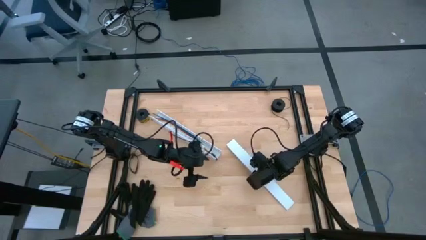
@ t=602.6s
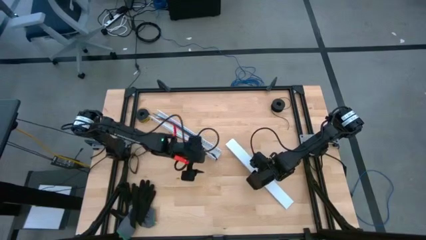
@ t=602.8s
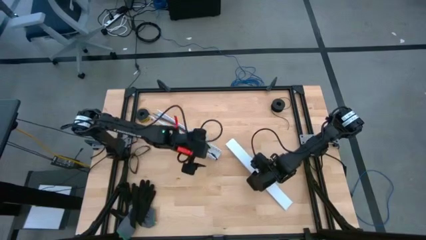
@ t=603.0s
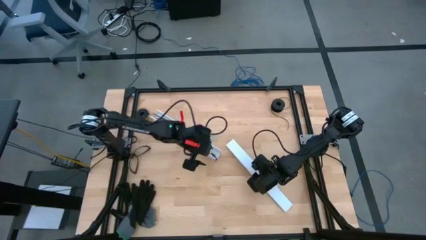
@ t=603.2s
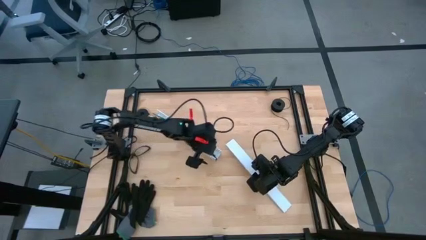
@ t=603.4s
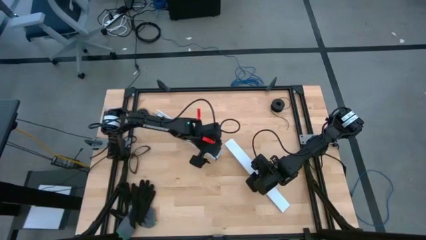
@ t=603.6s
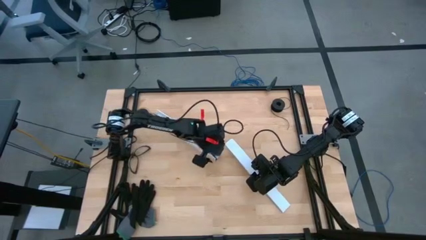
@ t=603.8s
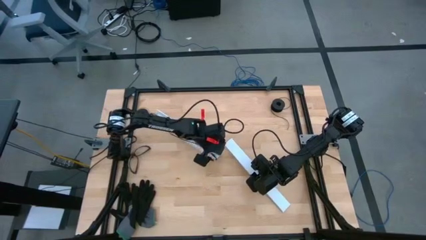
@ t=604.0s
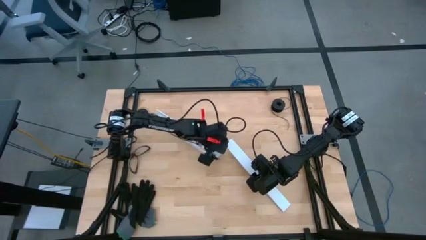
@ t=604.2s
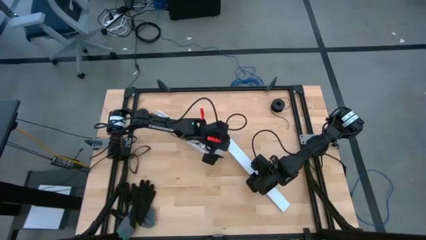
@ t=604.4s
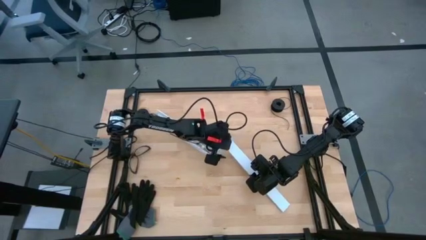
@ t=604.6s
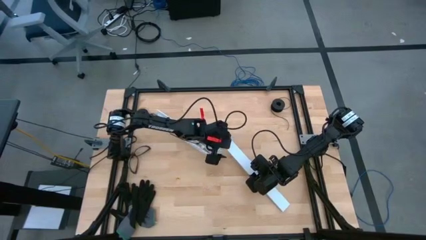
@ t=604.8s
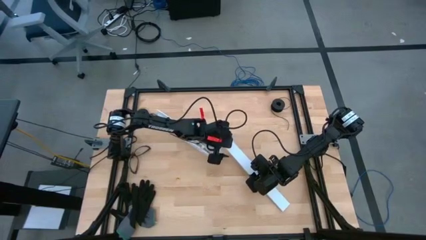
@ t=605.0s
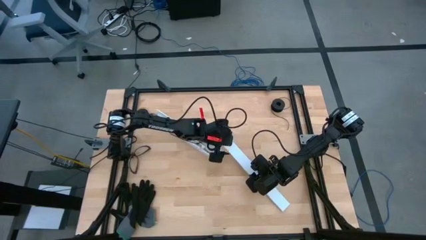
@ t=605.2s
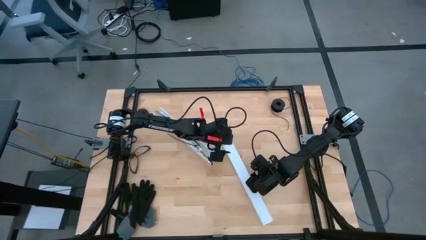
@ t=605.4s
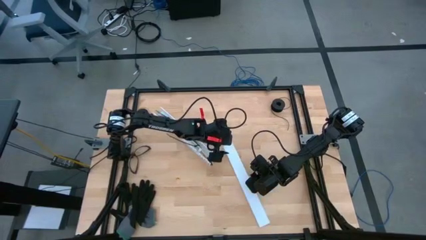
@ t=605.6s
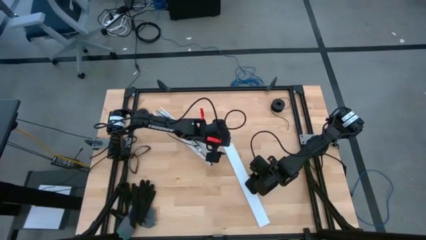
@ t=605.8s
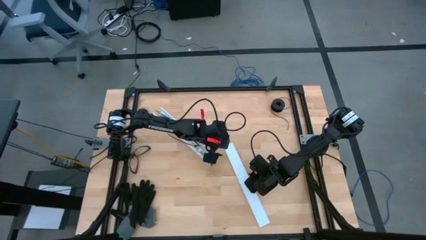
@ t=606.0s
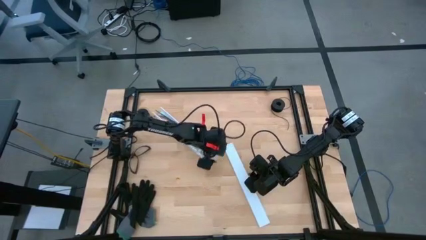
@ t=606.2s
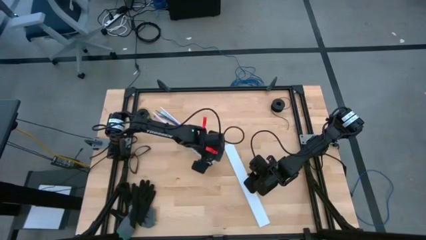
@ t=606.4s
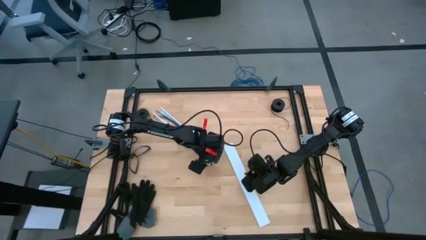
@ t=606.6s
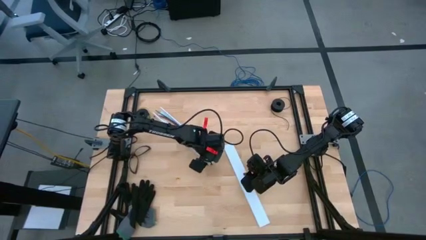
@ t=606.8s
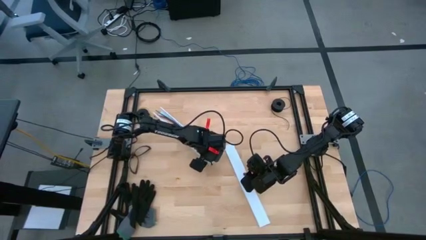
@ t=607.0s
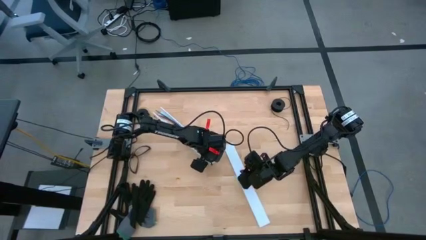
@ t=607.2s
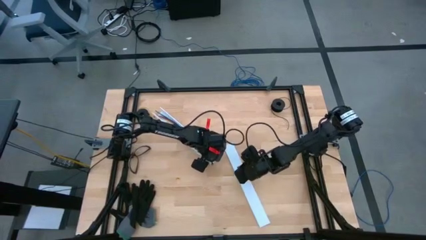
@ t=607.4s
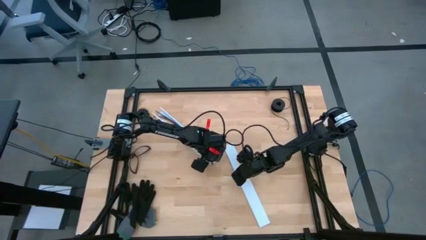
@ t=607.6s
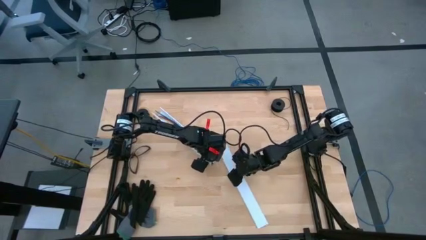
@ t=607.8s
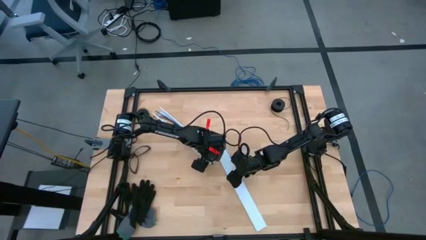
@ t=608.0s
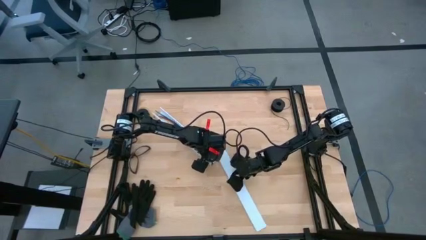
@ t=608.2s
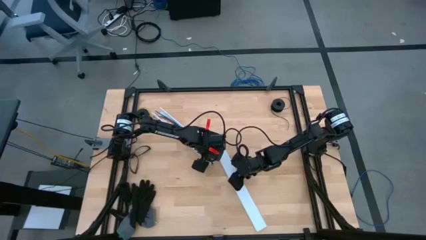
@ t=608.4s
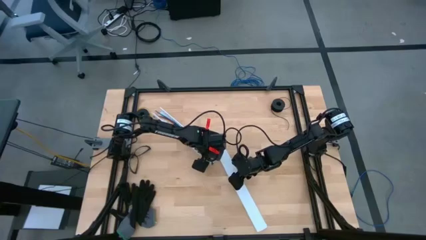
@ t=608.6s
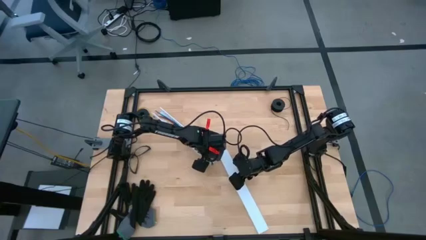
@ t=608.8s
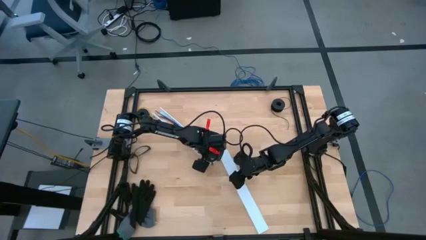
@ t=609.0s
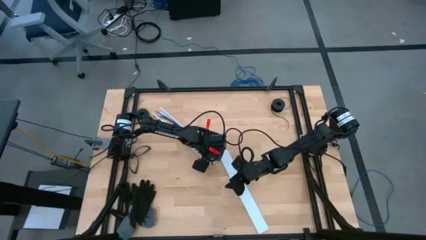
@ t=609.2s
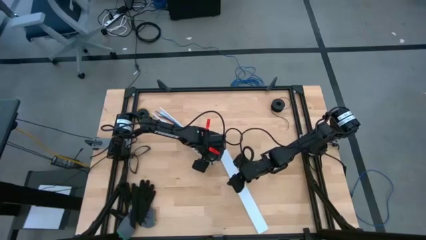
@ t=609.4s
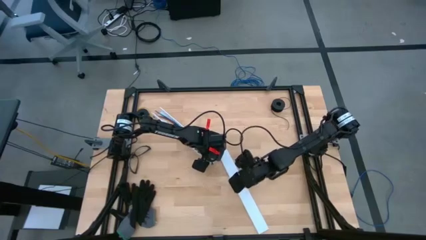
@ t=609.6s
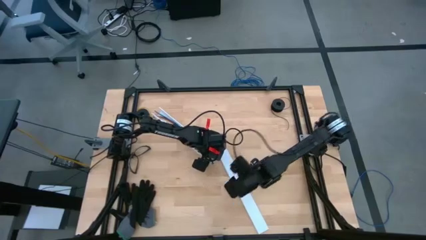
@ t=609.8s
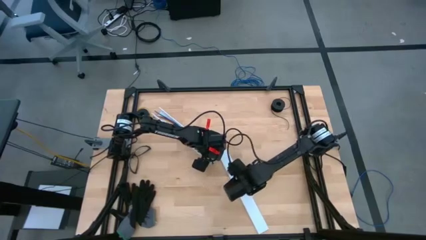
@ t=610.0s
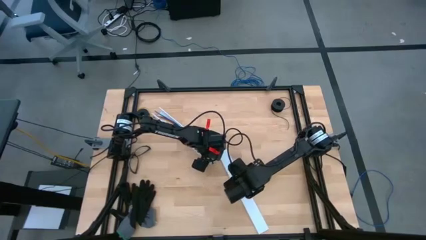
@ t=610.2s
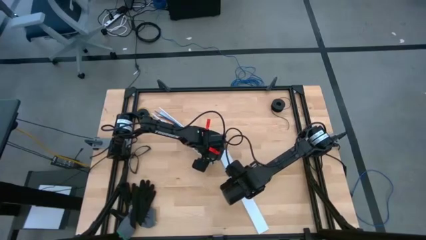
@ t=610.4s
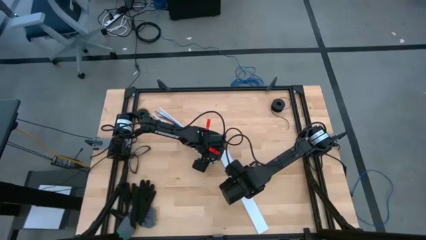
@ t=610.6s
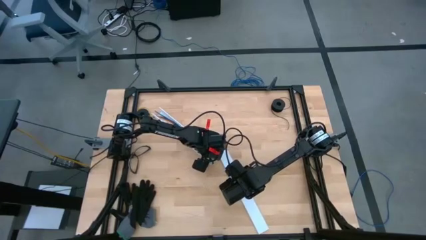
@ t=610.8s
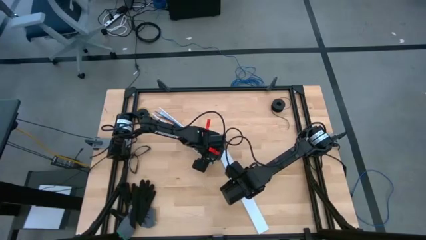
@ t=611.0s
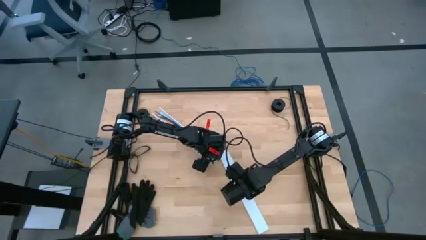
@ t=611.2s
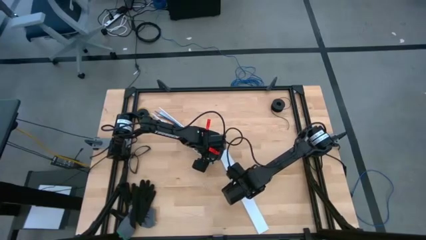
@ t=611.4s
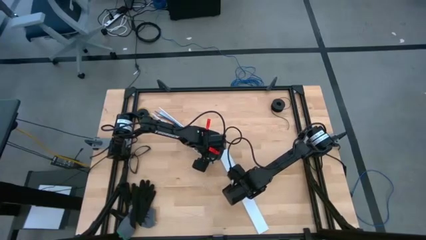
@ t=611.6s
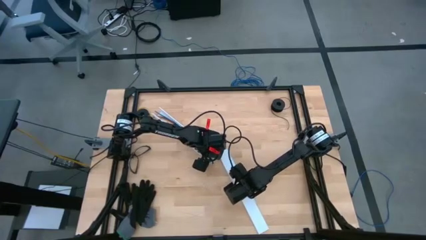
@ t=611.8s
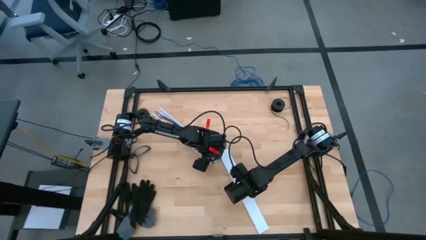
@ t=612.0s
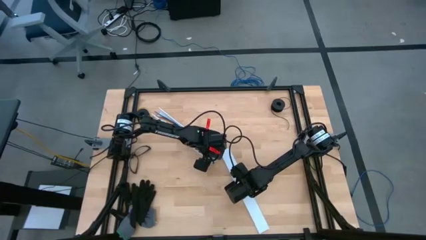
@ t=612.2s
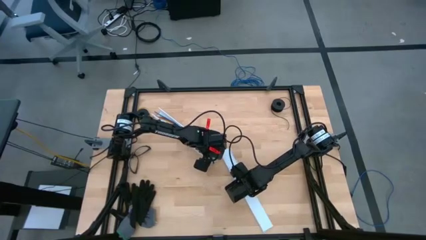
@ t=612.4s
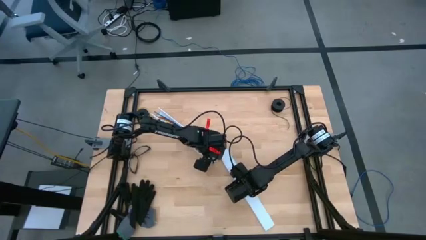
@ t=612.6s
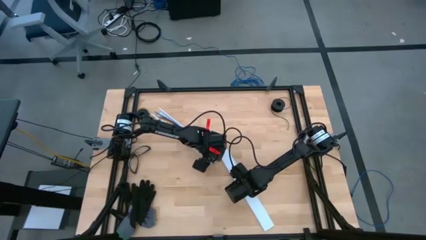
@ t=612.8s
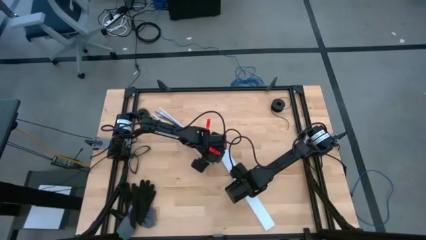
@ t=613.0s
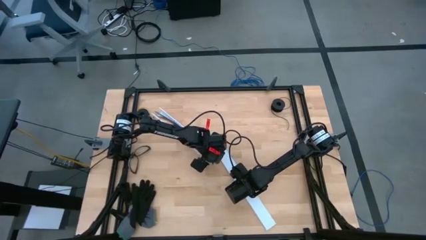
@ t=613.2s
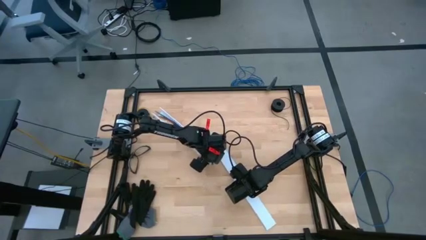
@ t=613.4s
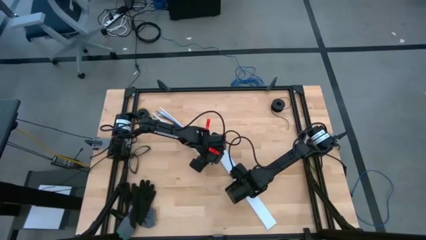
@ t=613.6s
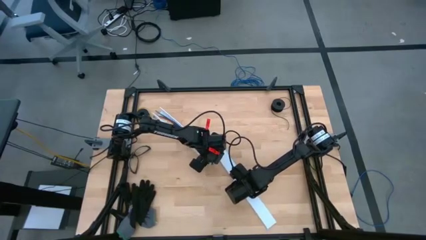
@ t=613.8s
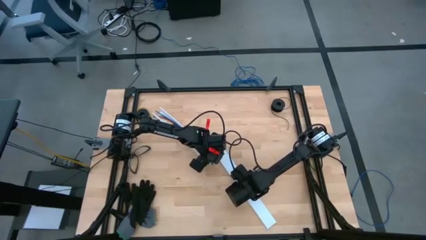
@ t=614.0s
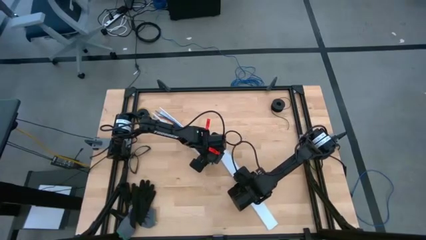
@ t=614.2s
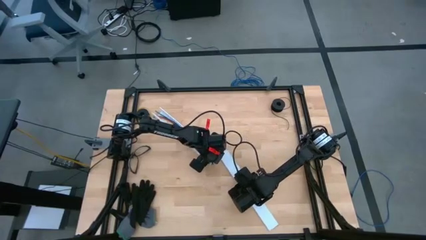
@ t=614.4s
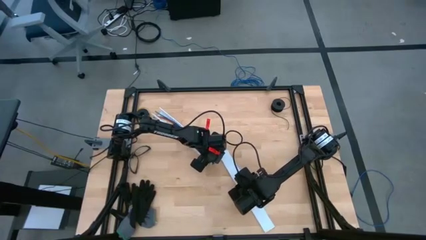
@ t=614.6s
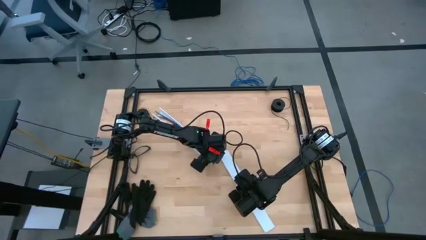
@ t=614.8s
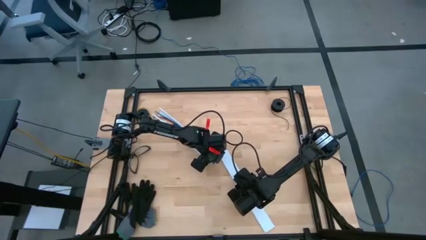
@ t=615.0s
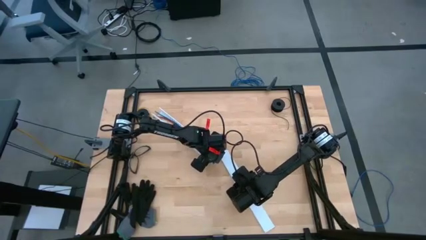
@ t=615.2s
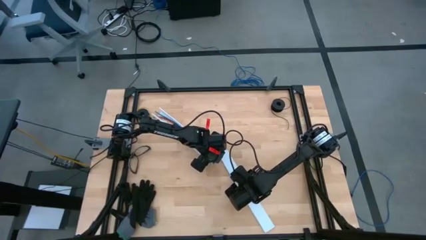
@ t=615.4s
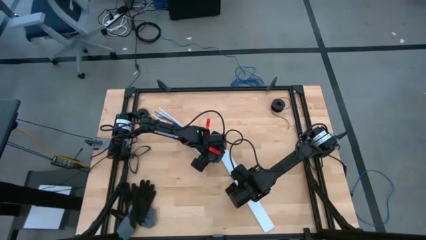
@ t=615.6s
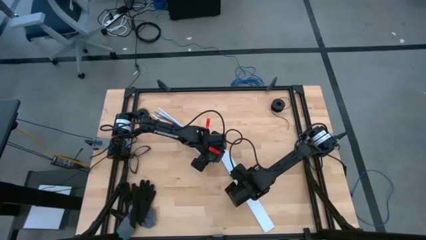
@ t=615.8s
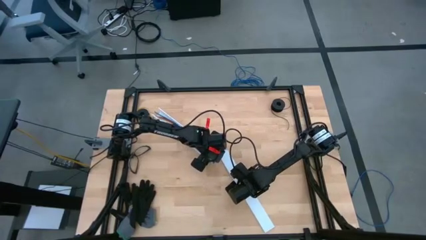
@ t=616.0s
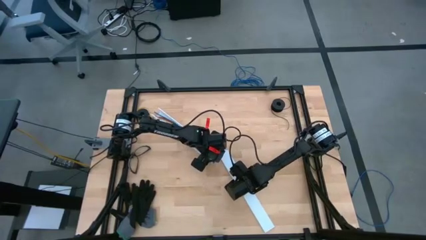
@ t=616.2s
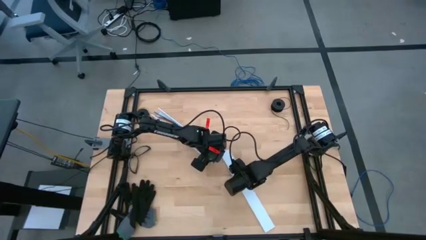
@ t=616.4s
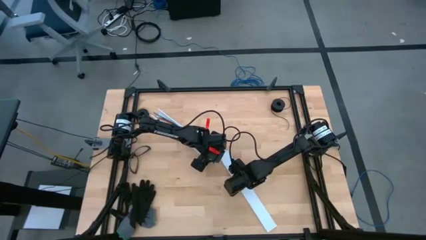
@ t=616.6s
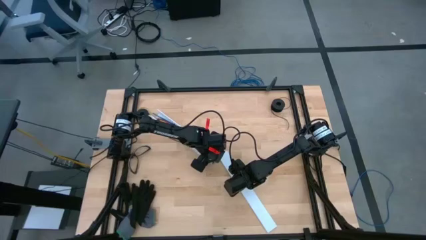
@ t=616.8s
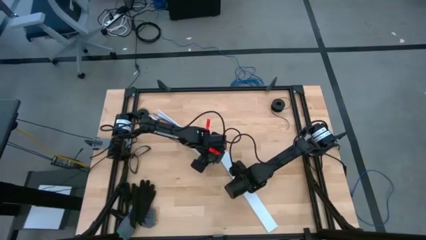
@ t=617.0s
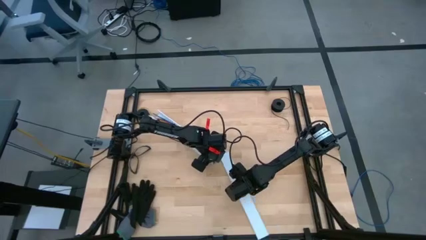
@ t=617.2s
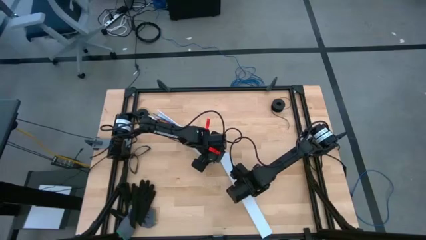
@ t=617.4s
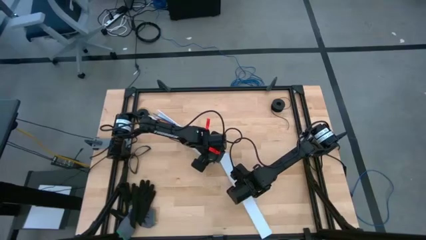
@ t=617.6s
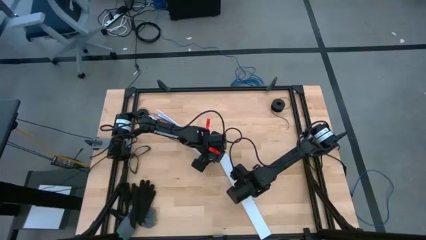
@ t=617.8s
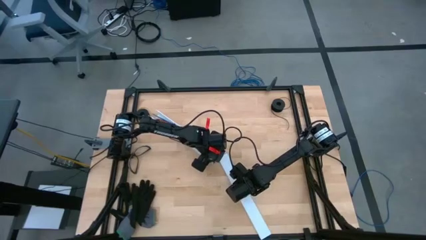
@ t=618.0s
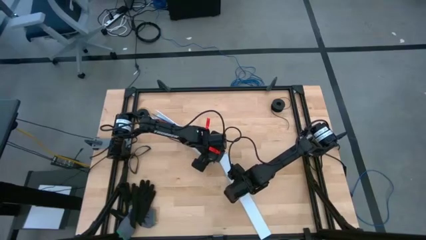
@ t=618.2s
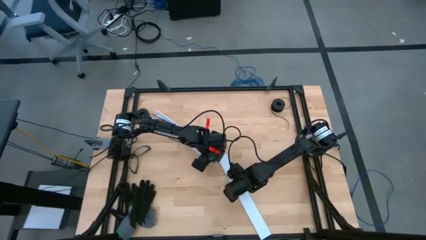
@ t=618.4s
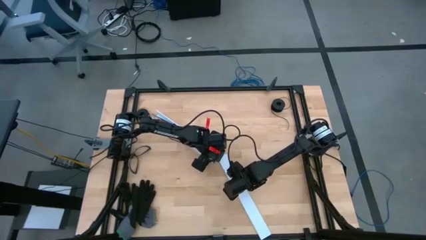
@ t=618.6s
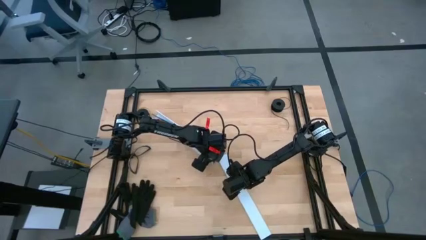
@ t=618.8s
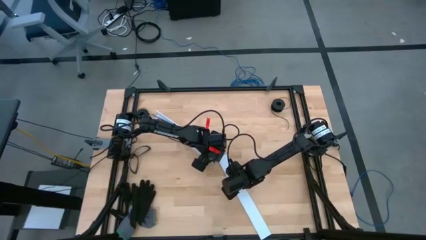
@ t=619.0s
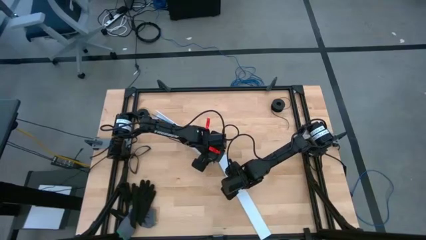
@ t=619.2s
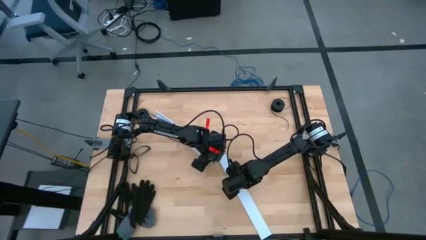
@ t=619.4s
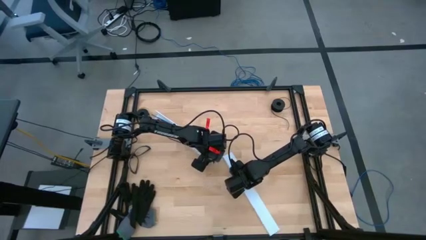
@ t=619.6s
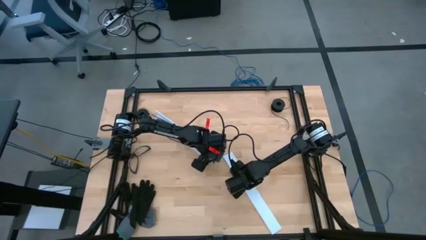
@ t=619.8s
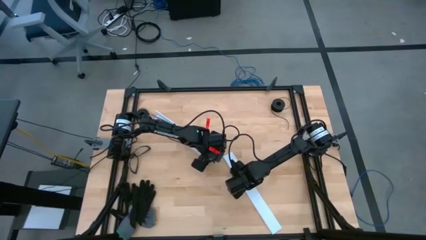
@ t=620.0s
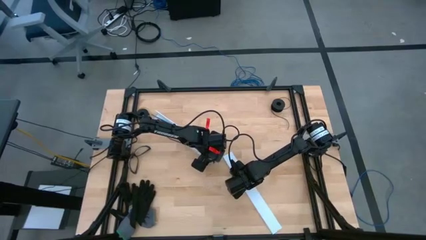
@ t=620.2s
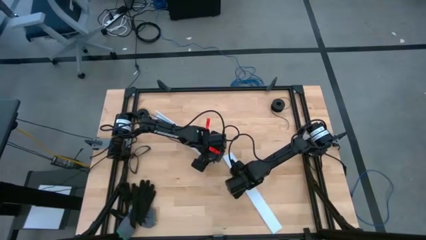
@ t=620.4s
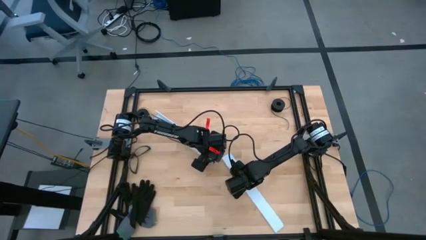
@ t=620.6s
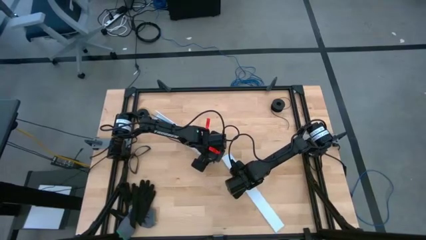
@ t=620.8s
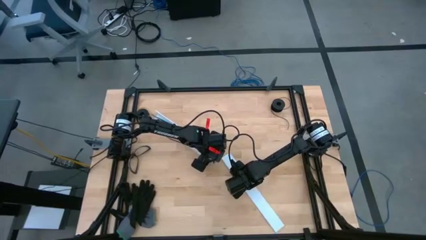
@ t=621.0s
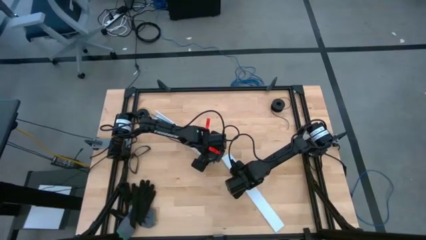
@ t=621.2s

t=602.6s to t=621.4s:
Task: Ziptie cables
Close the white cable duct
